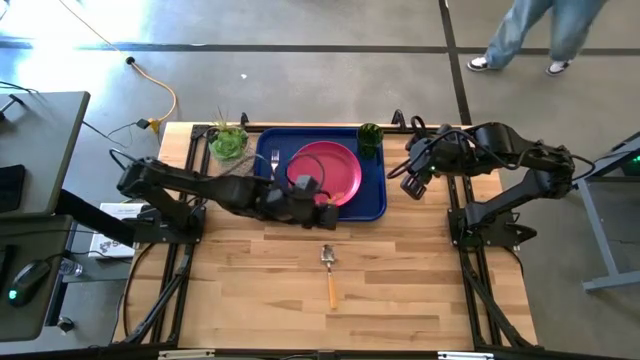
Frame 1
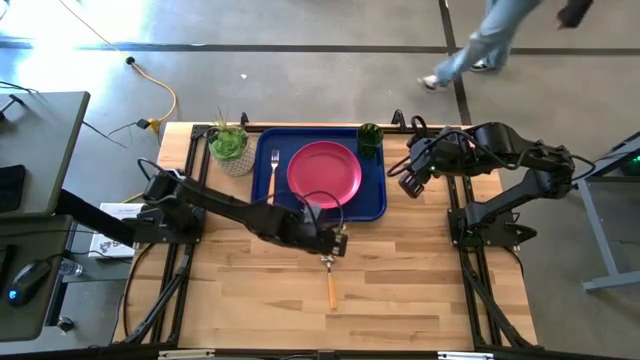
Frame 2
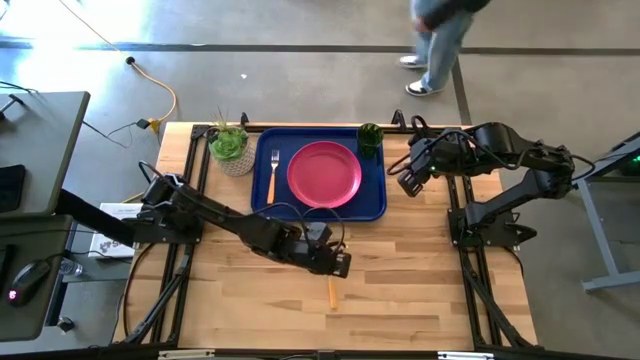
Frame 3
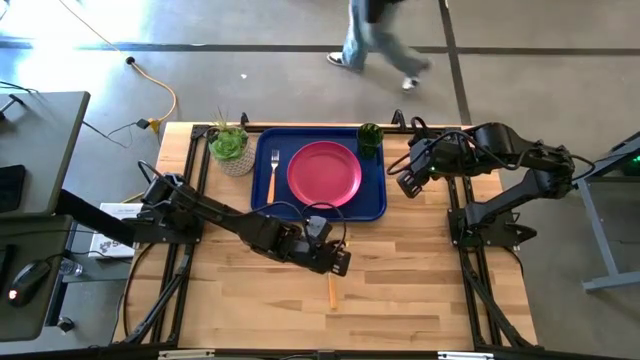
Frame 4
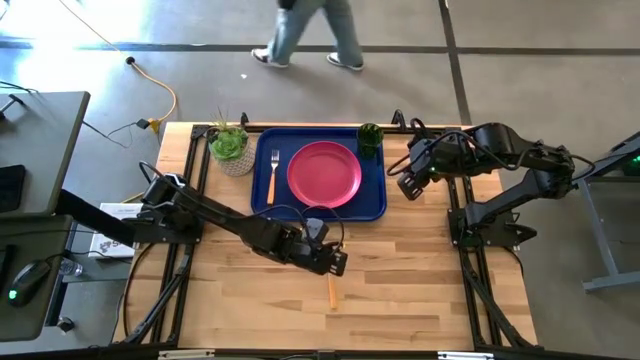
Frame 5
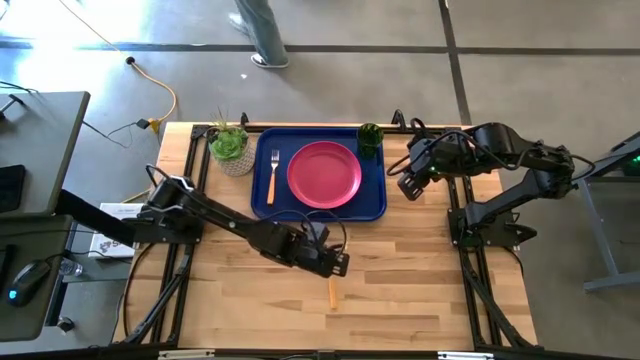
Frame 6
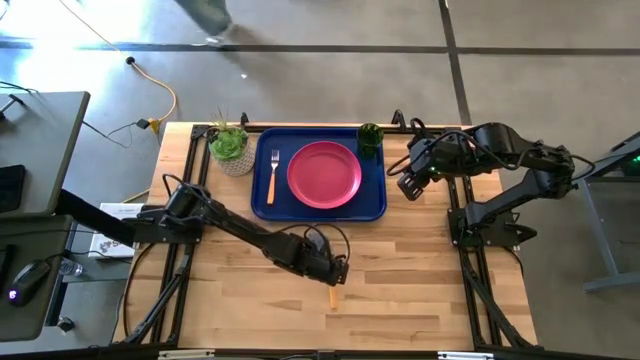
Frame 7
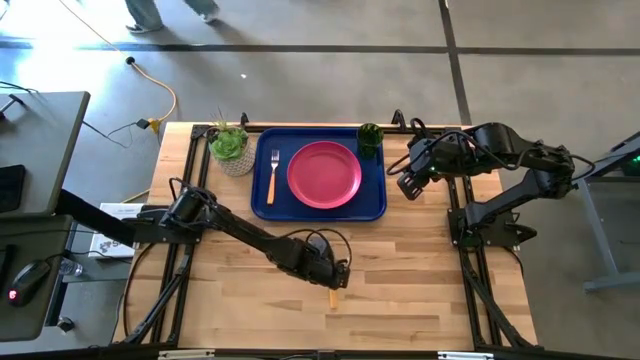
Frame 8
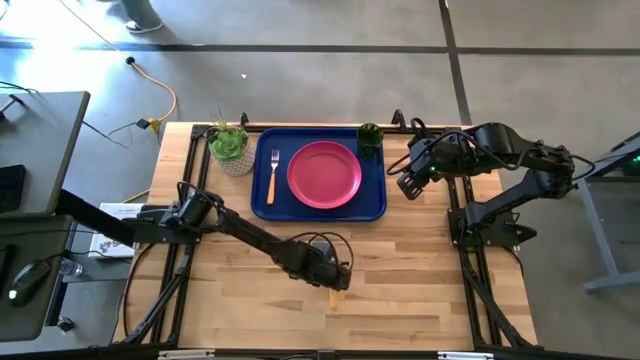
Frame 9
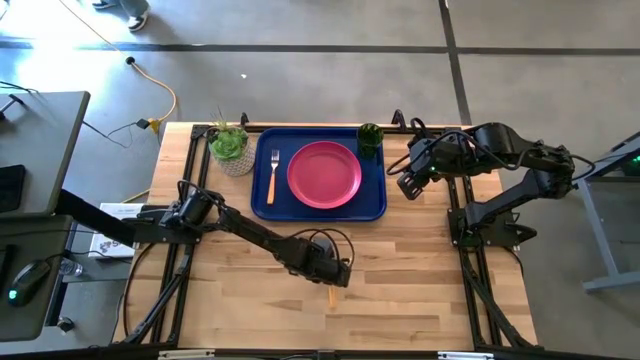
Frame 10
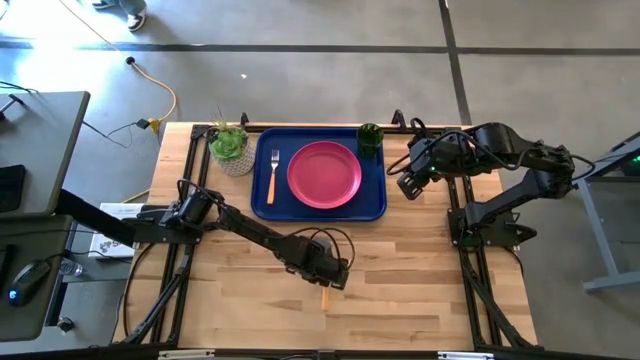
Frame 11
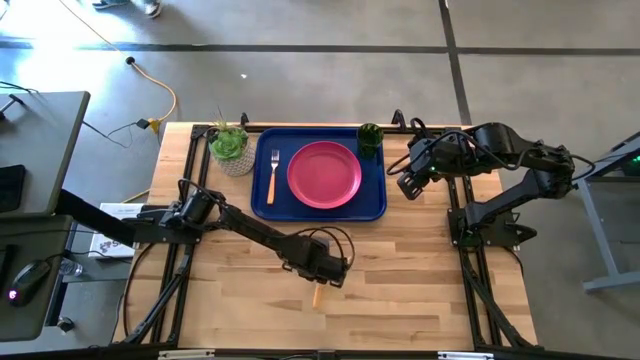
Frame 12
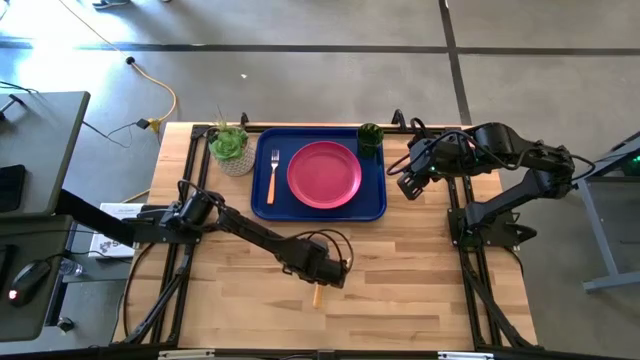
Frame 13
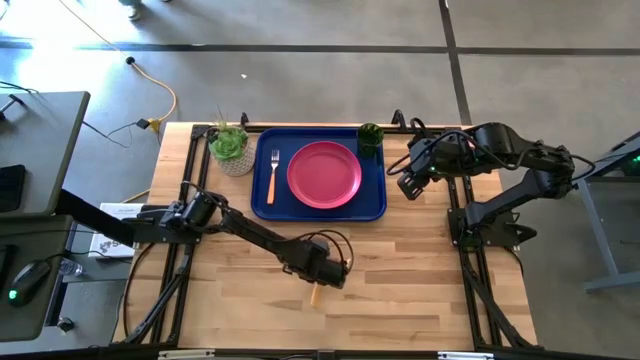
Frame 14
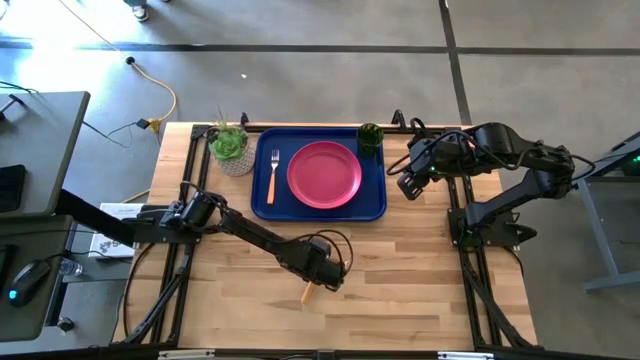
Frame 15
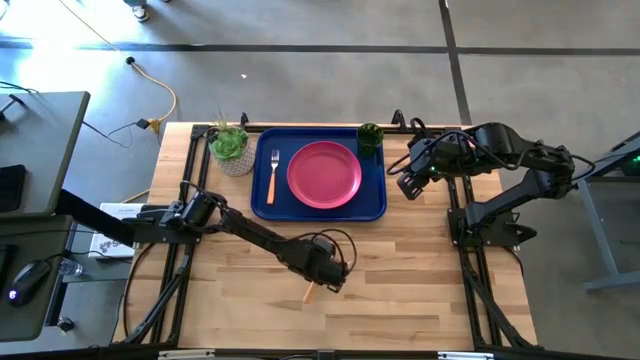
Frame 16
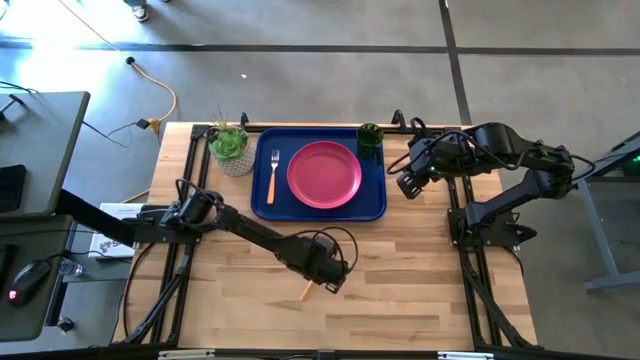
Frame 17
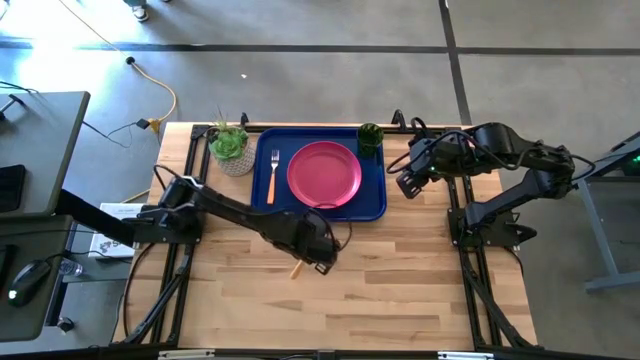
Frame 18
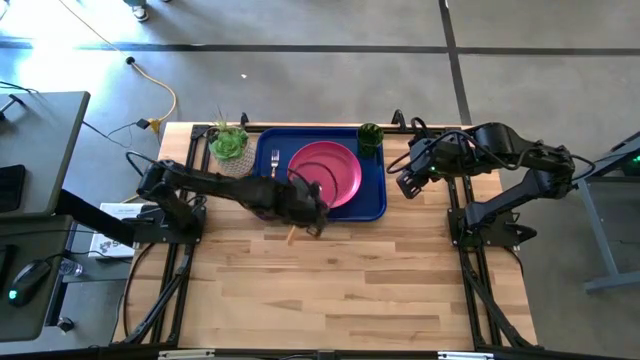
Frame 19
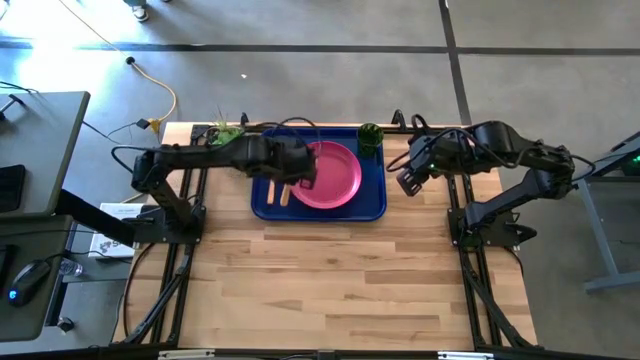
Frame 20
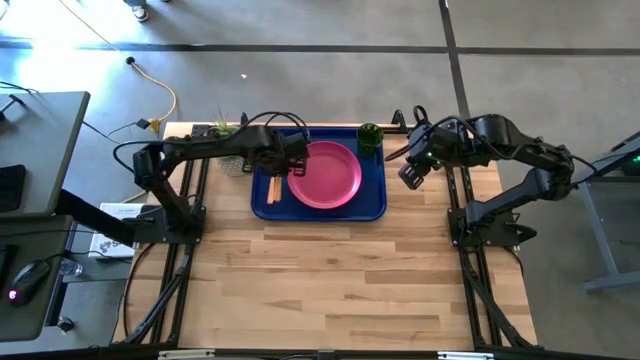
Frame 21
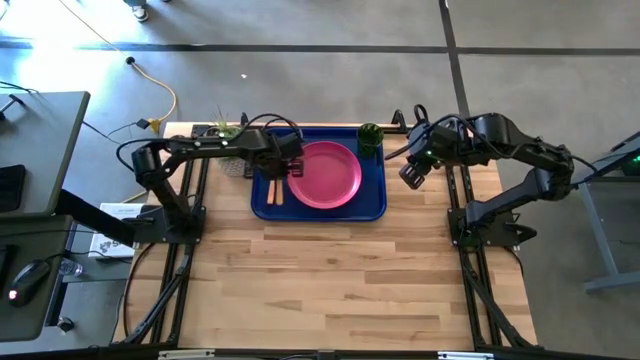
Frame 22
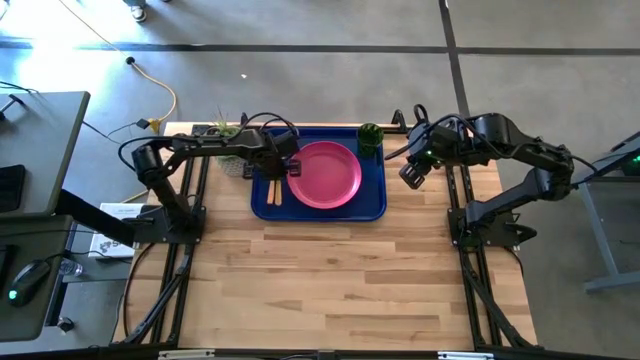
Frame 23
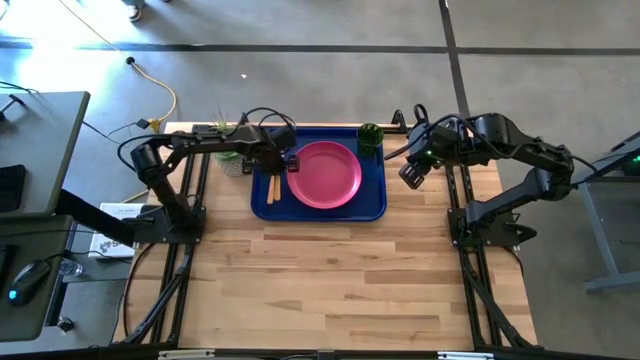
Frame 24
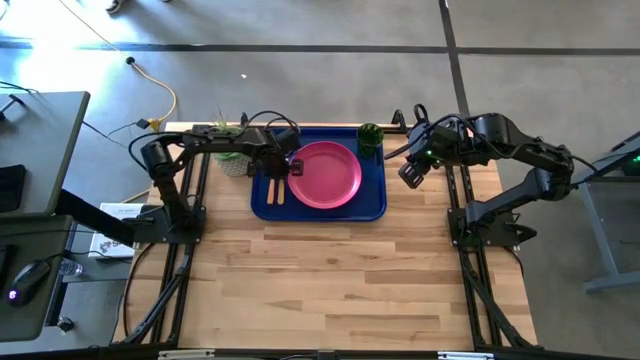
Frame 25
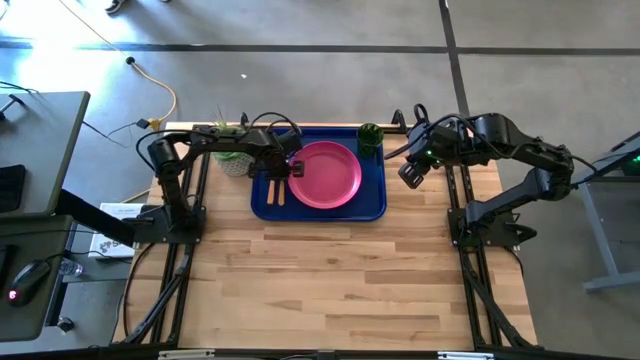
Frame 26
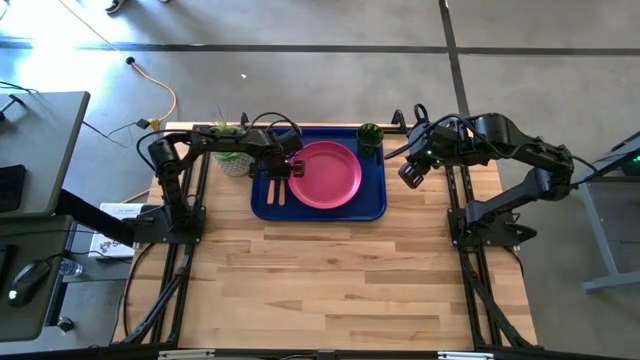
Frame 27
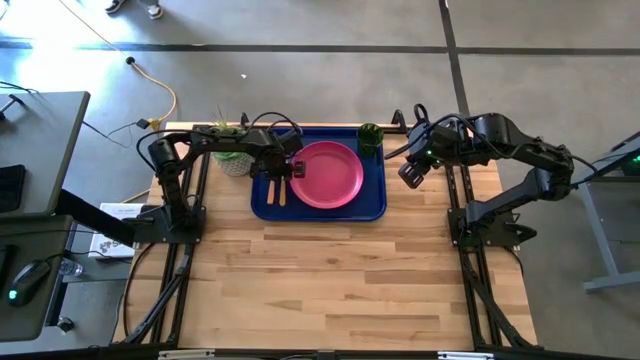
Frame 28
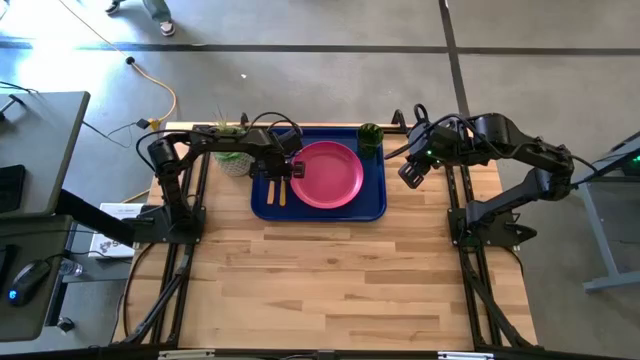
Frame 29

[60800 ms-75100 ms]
Task: Pick and place plate/cup/fork/spoon on tray
Put the orange spoon on the left of the pink plate on the blue tray

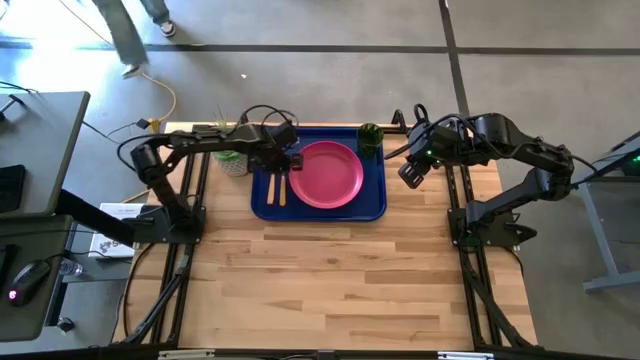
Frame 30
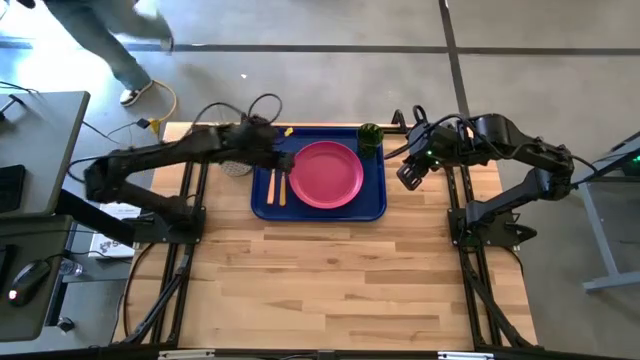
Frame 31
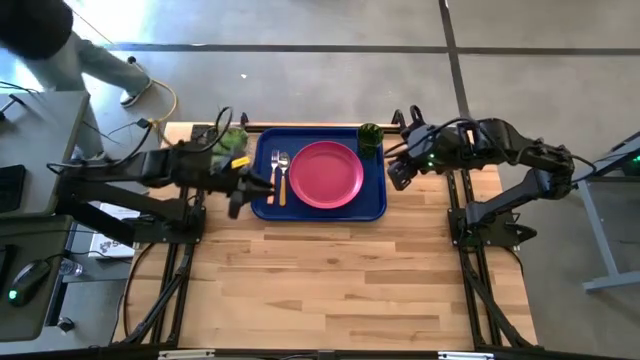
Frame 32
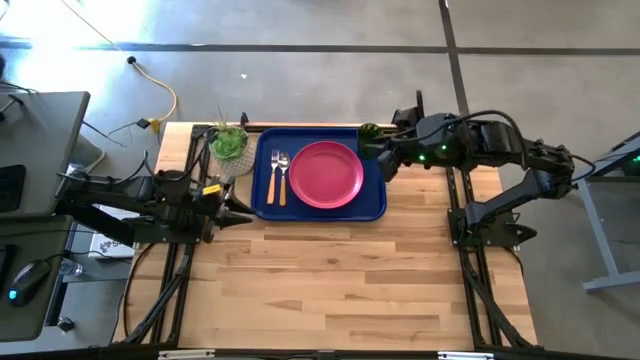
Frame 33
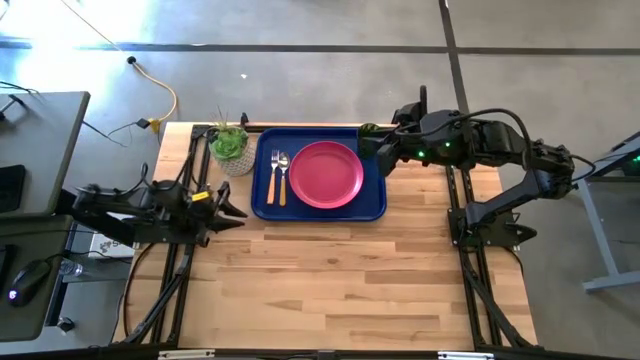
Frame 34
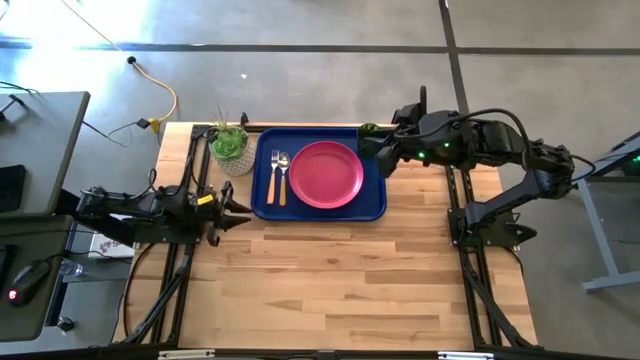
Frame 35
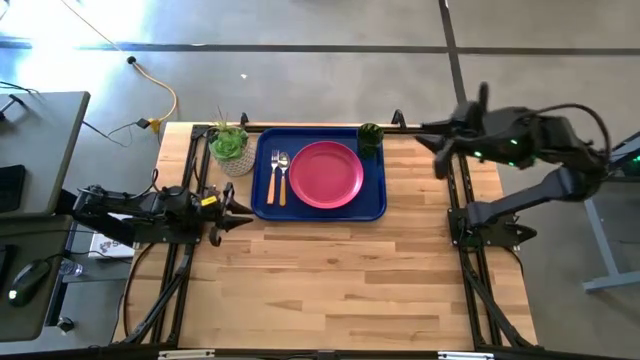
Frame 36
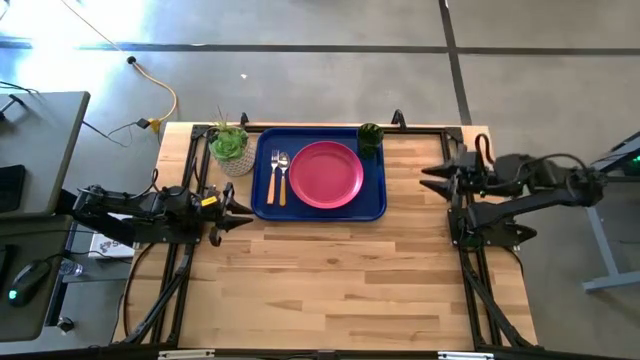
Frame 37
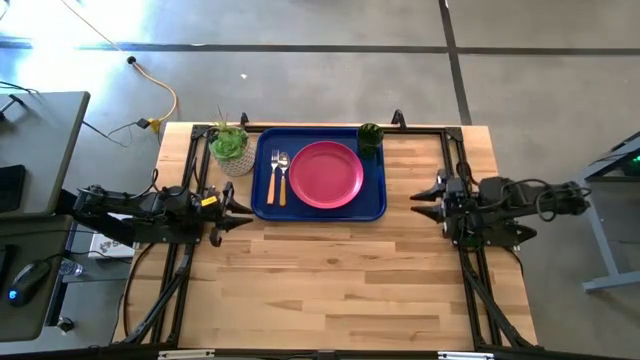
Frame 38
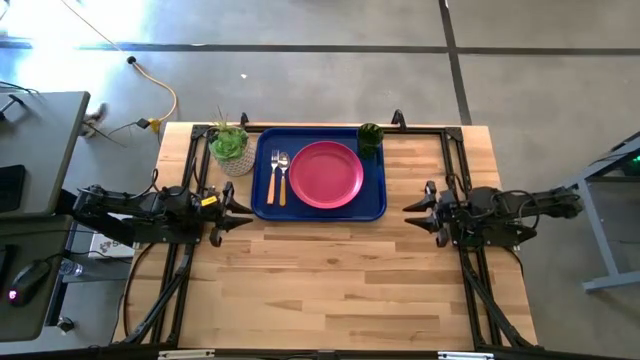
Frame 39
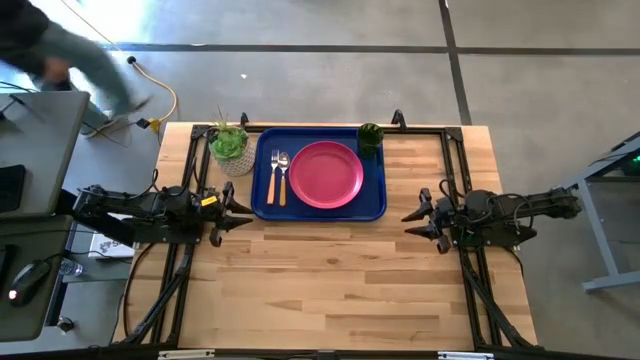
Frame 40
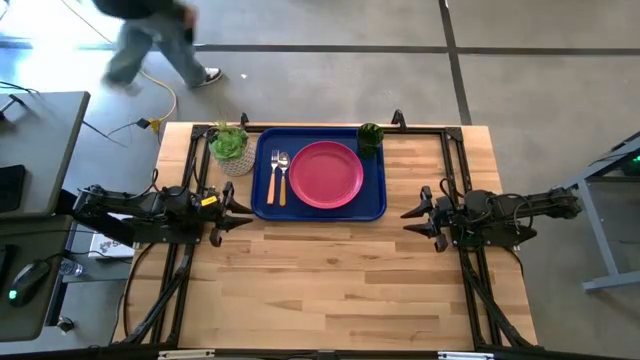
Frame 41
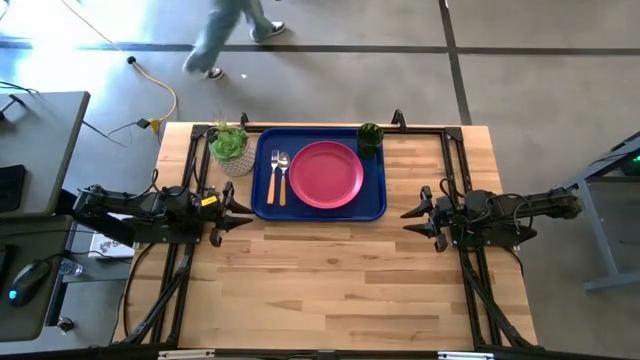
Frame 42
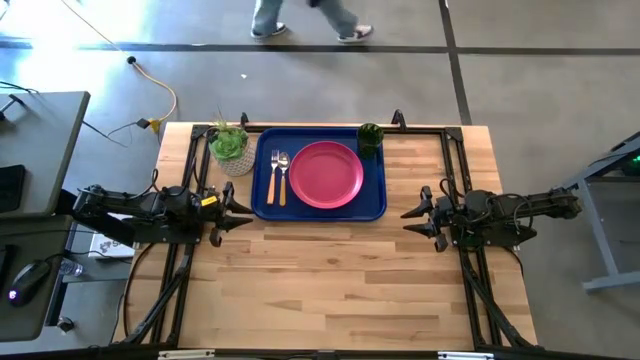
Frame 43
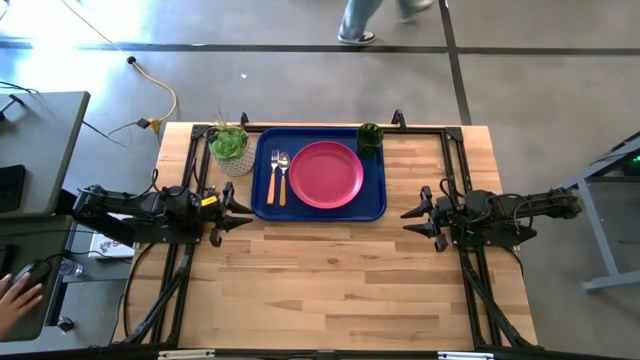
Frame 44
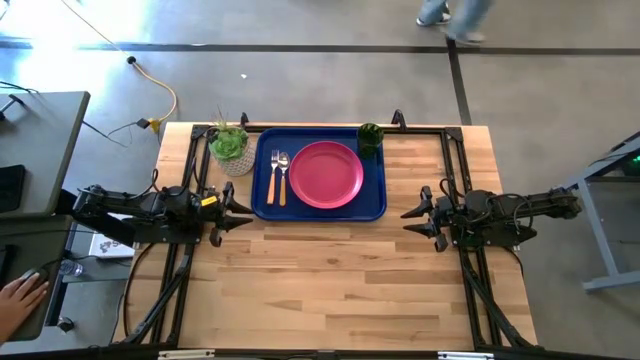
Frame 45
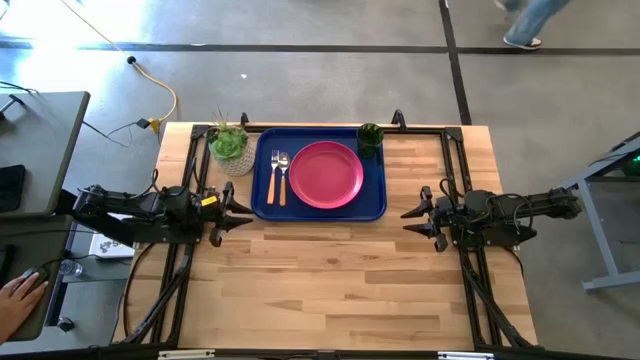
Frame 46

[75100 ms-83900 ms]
Return to Home Position
